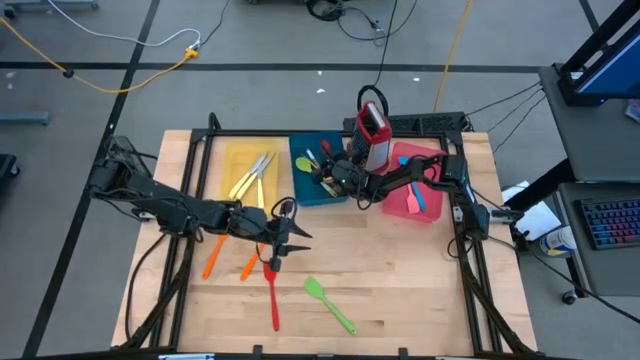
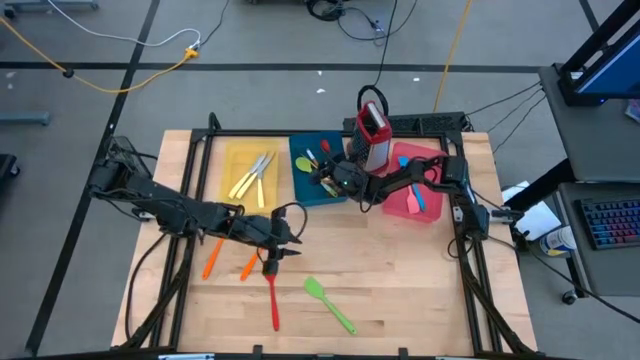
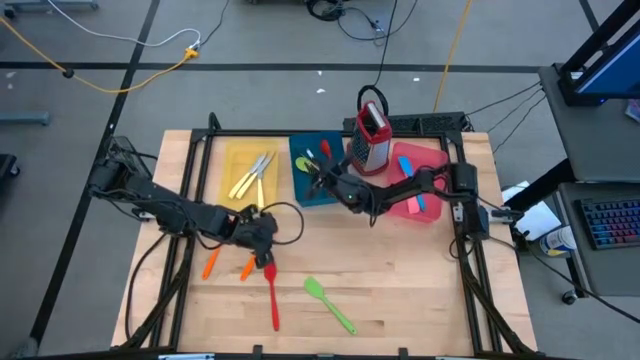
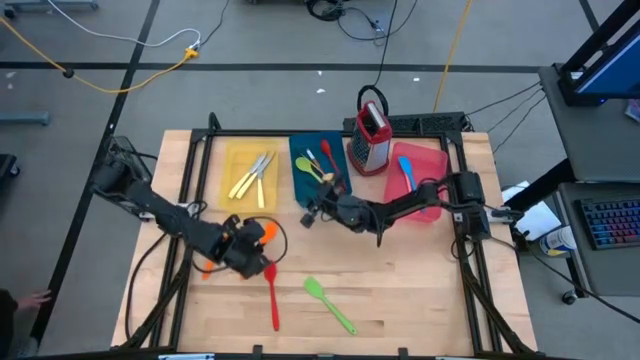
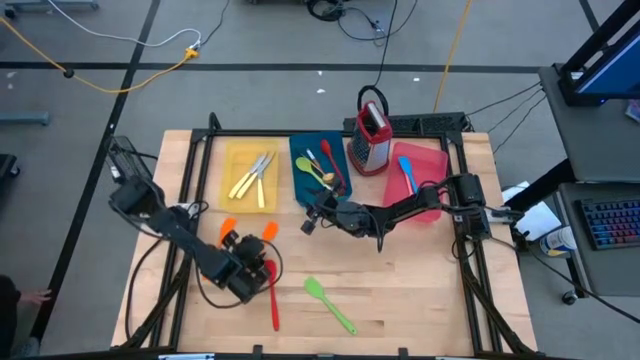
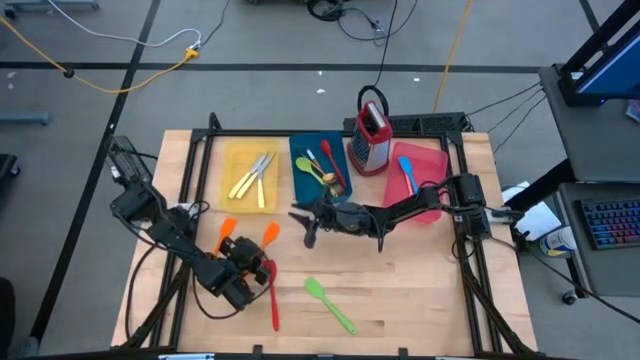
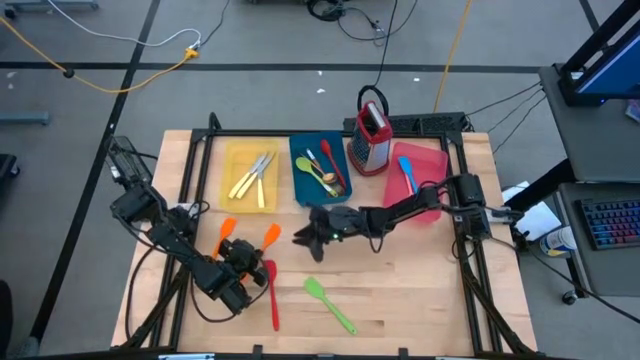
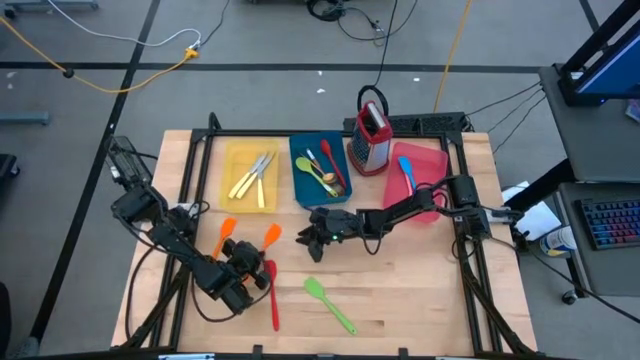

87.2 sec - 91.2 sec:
Task: Pick & Place Kitchen Items
Put the right orange spatula into the pink bin

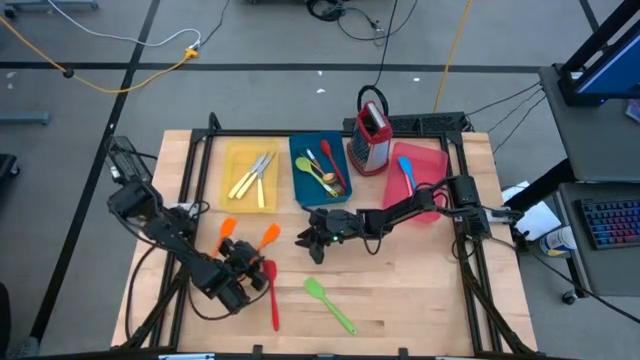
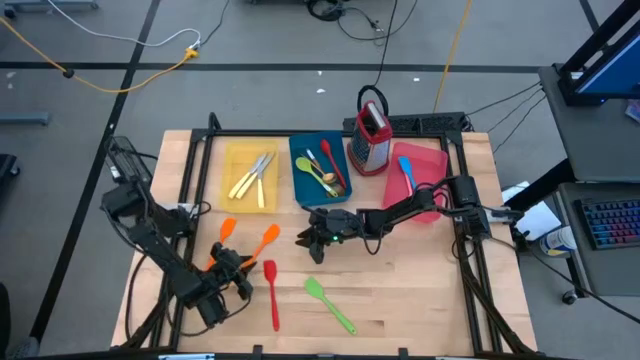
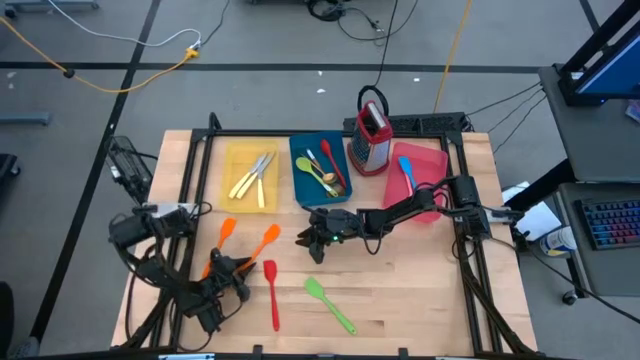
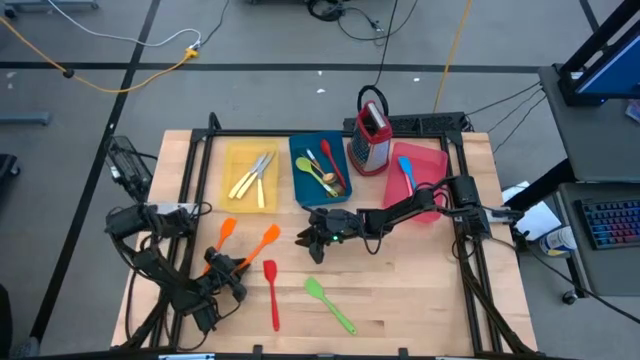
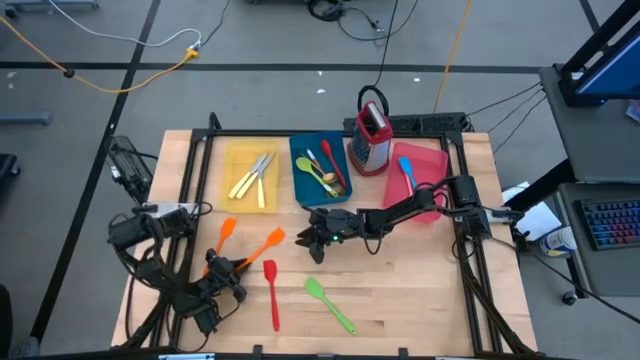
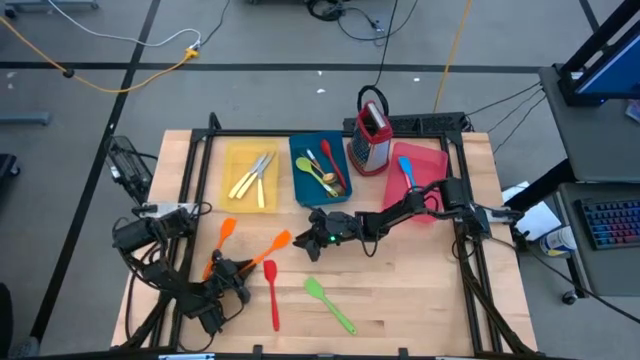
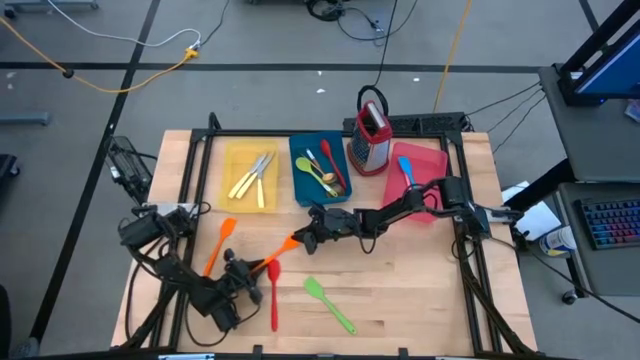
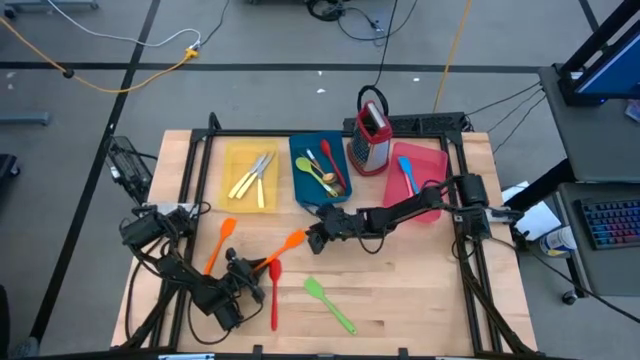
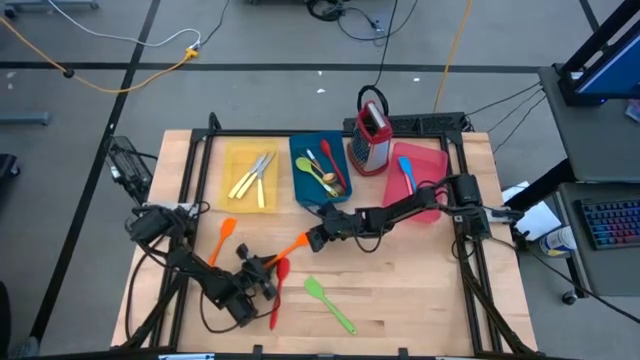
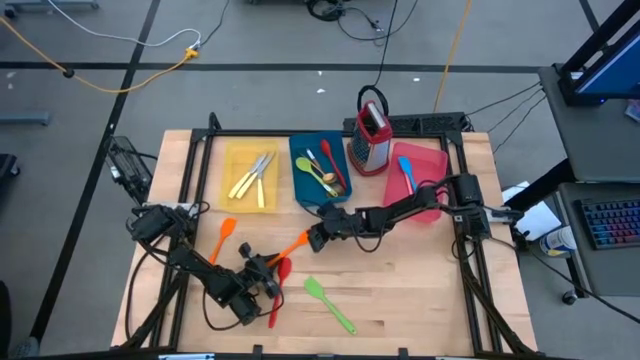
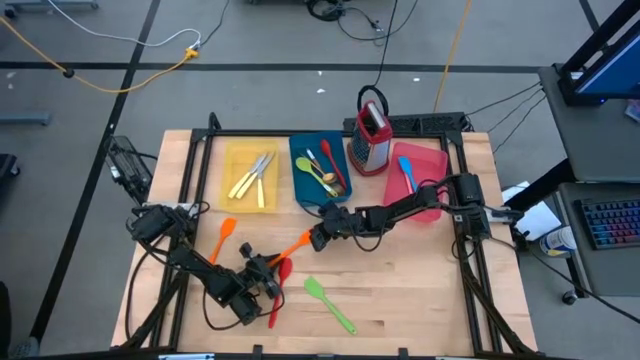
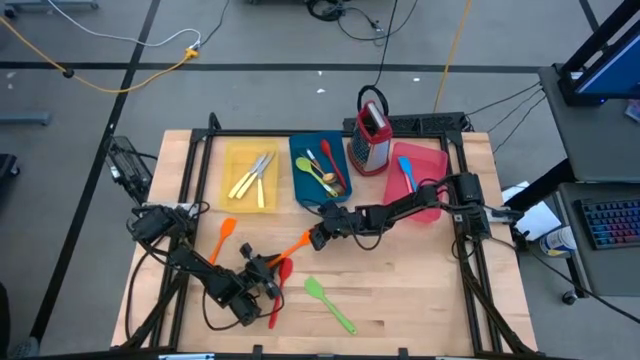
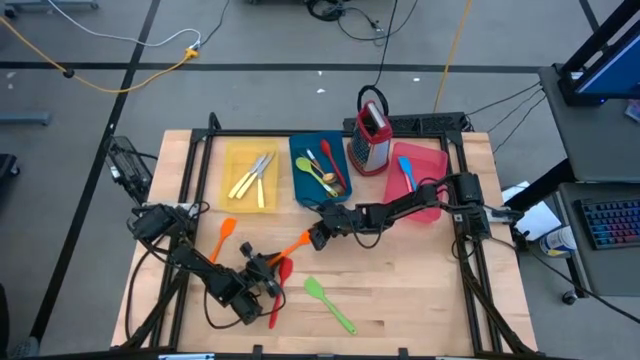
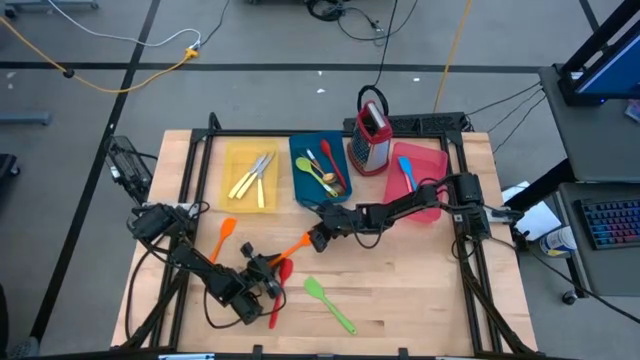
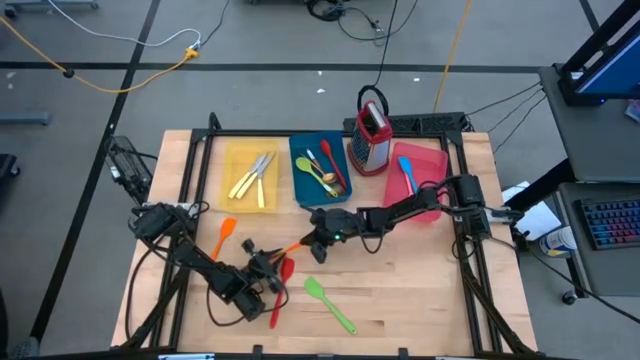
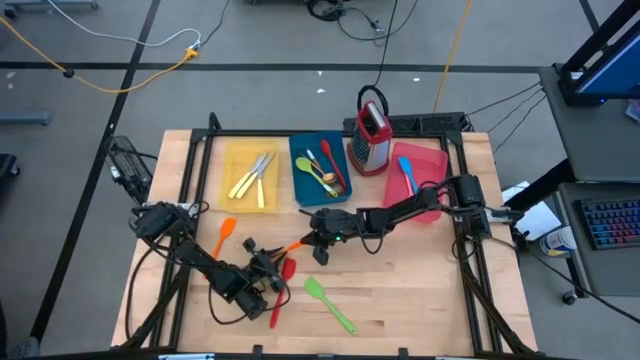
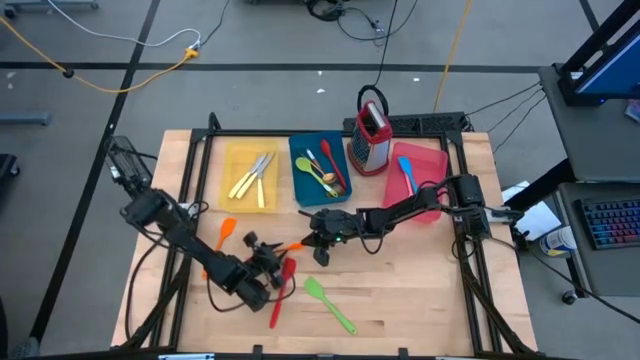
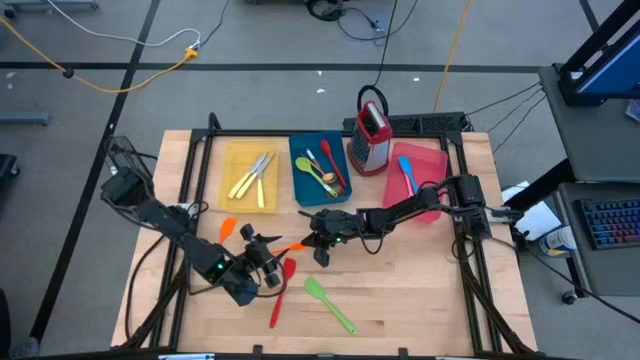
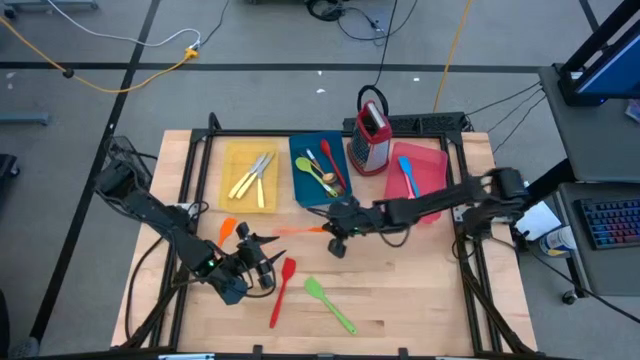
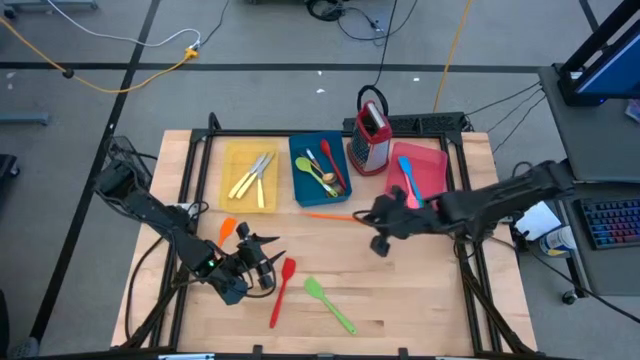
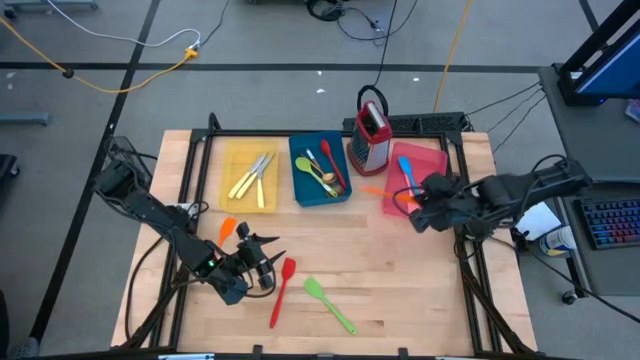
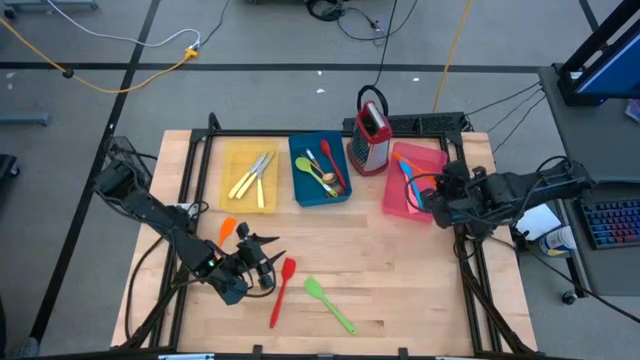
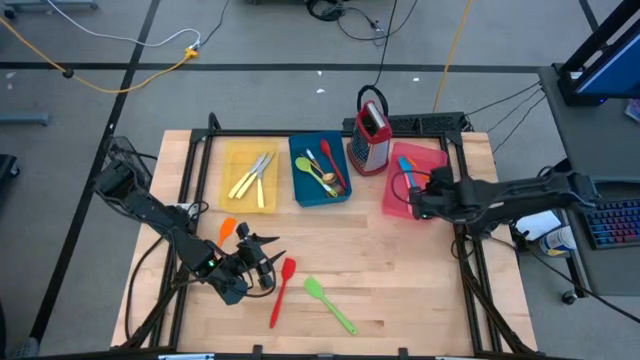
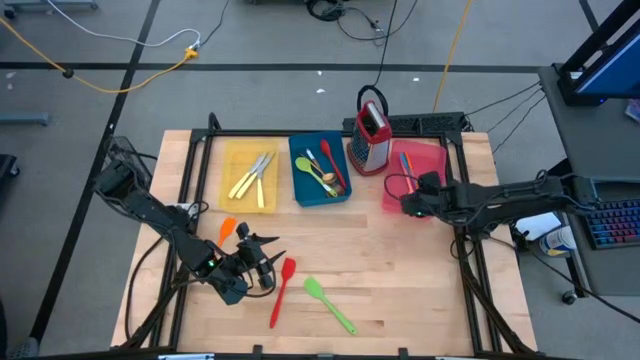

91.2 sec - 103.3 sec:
Put the right orange spatula into the pink bin

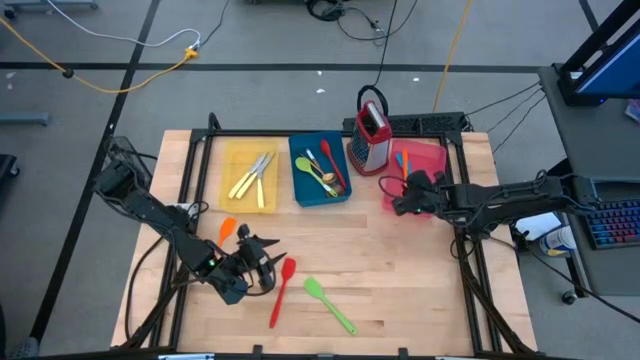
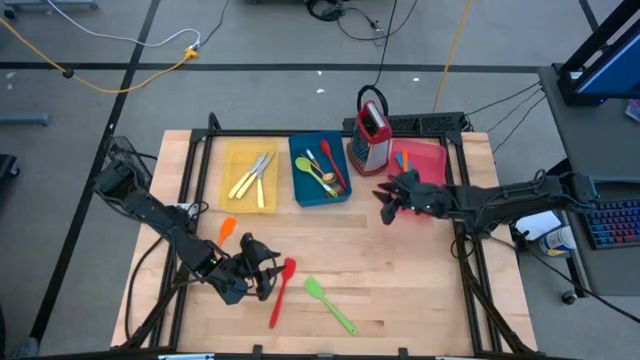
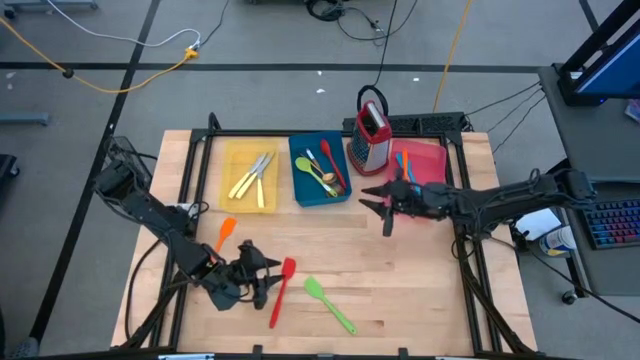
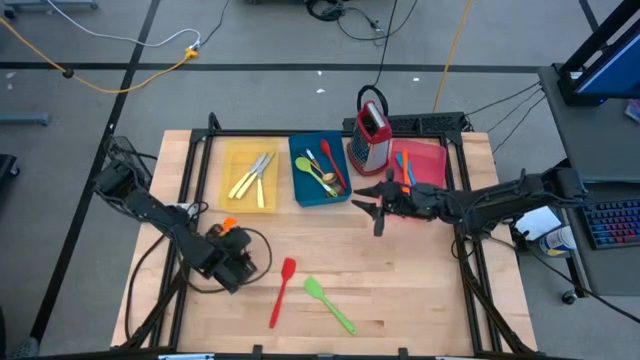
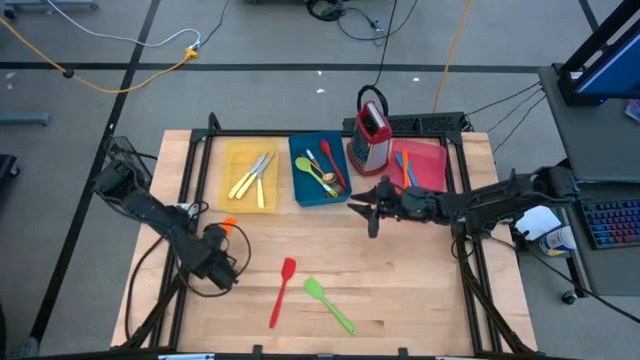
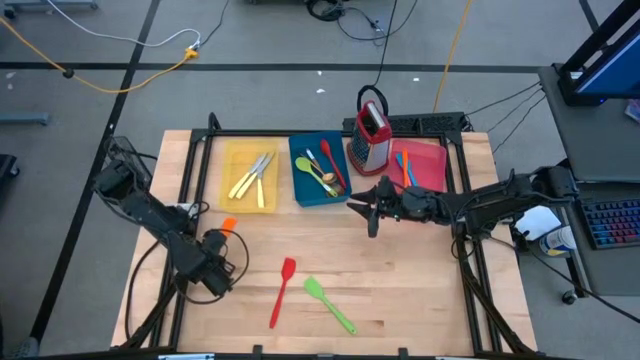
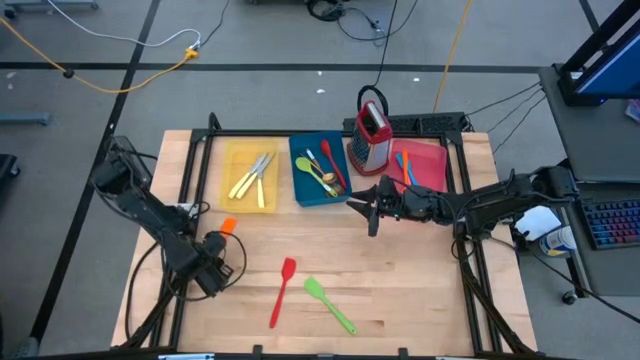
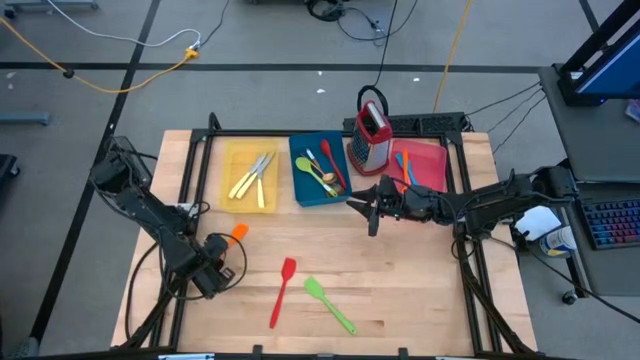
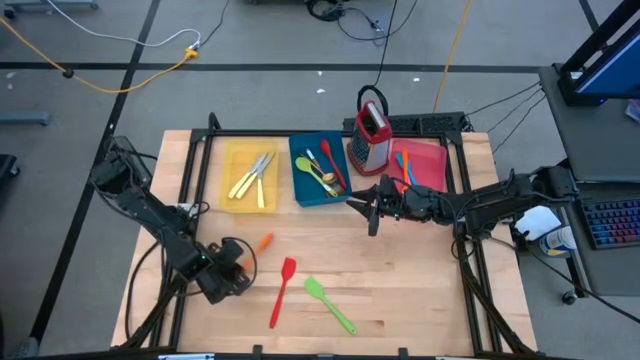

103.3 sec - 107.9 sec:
Put the orange spatula into the pink bin

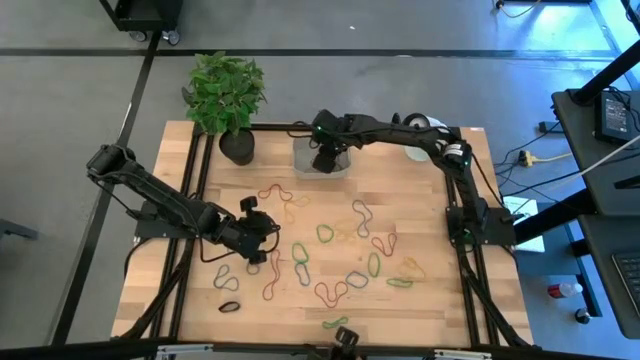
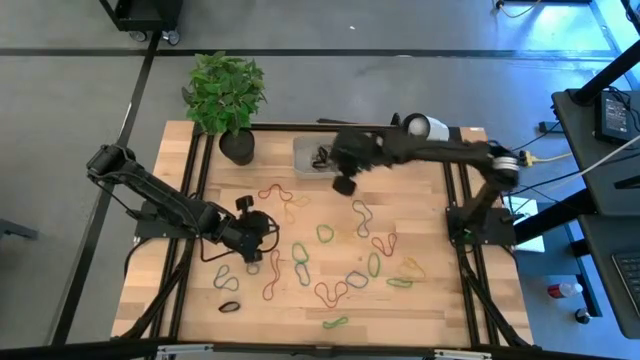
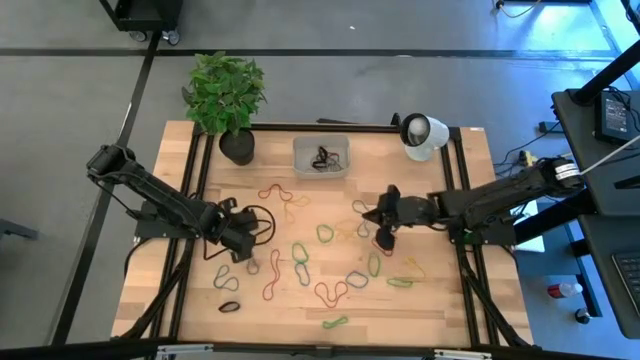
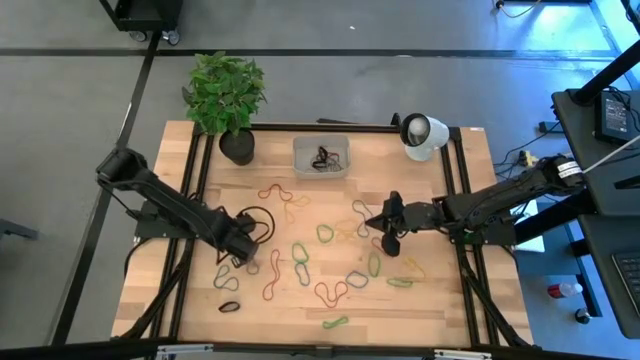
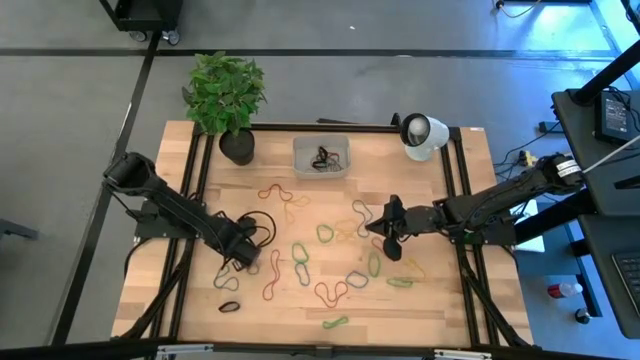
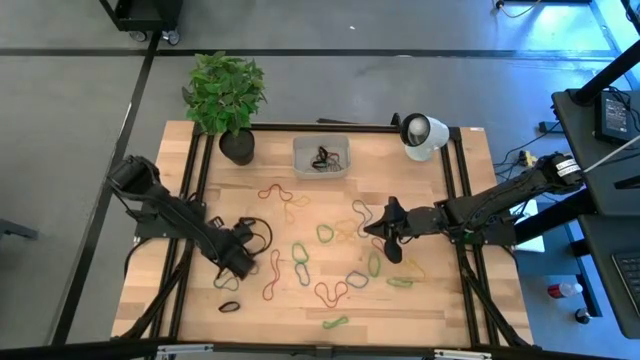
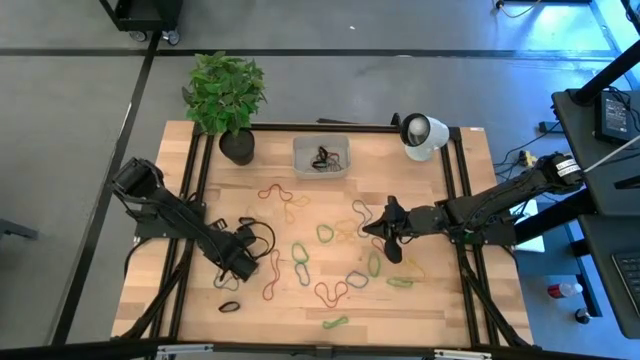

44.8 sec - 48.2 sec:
Task: Pick and place rubber bands into bin
Put the blue rubber band into the gray bin
